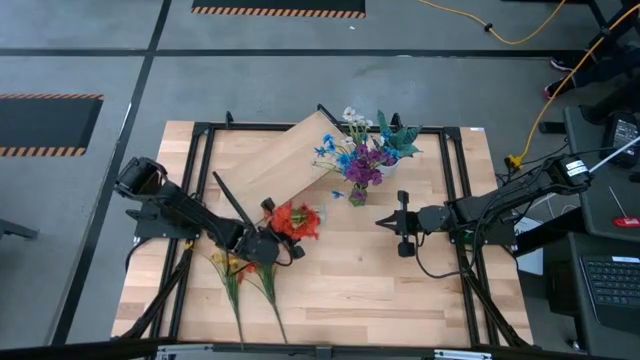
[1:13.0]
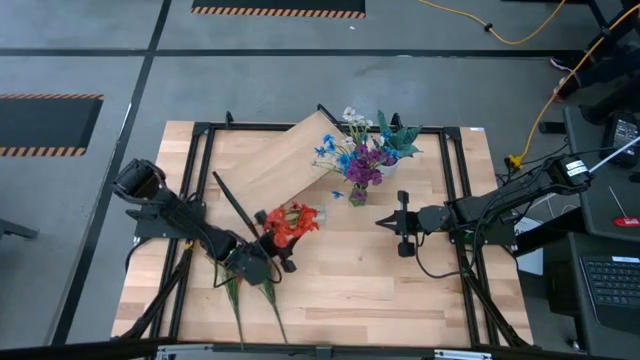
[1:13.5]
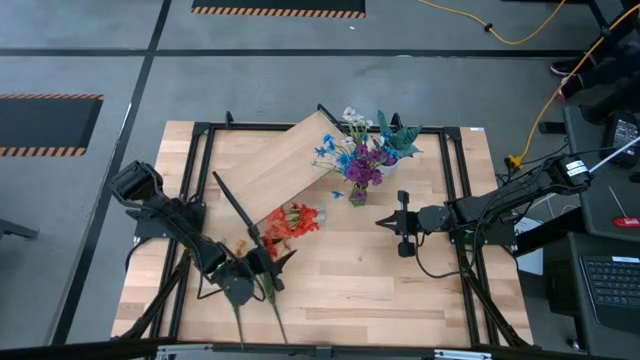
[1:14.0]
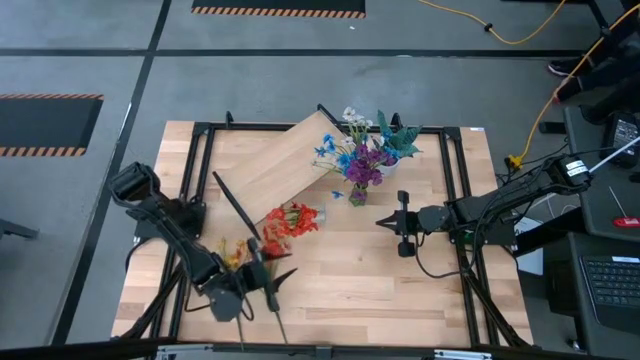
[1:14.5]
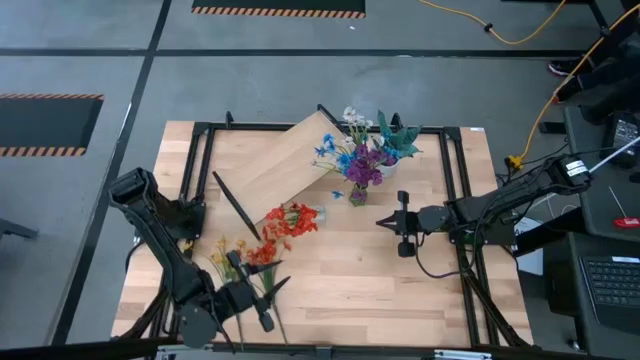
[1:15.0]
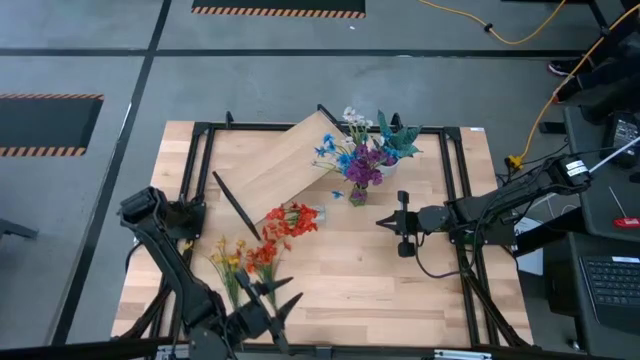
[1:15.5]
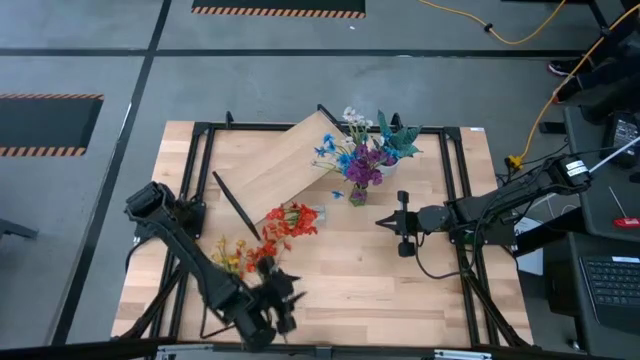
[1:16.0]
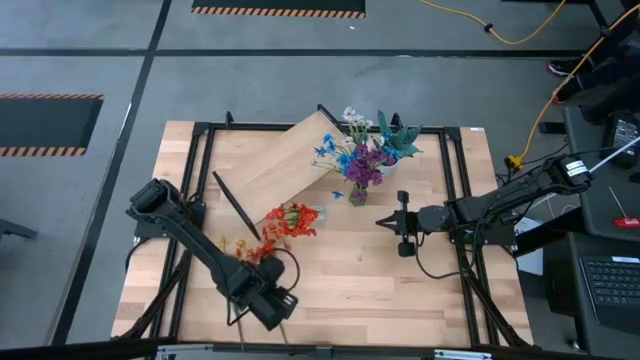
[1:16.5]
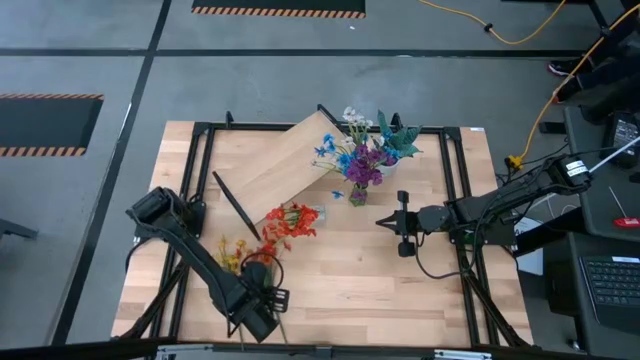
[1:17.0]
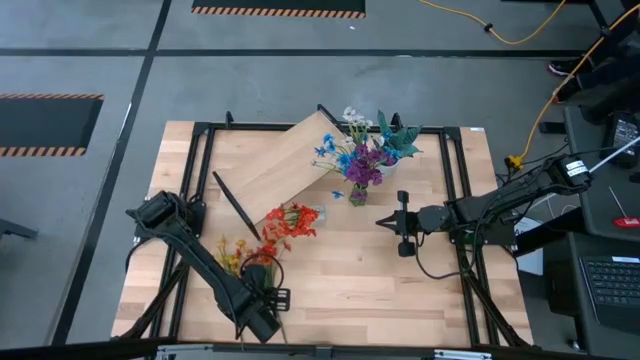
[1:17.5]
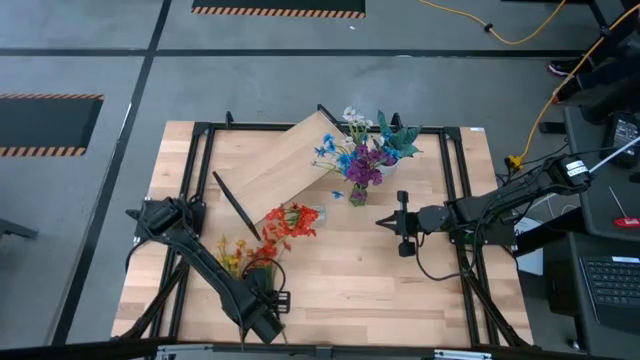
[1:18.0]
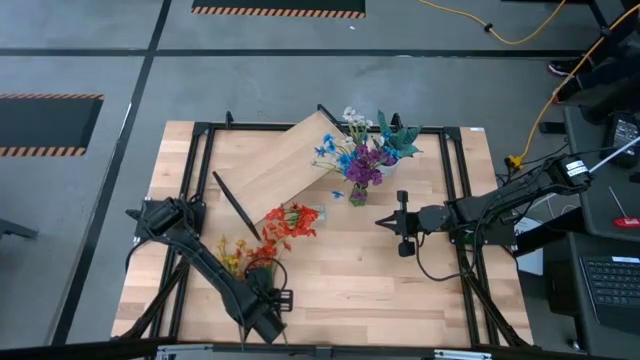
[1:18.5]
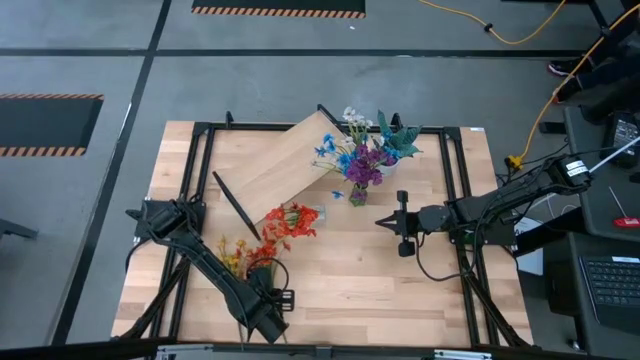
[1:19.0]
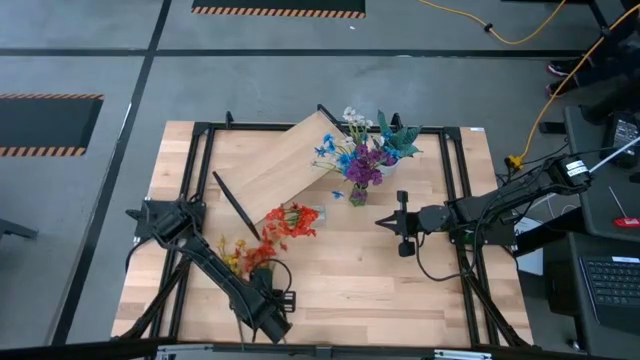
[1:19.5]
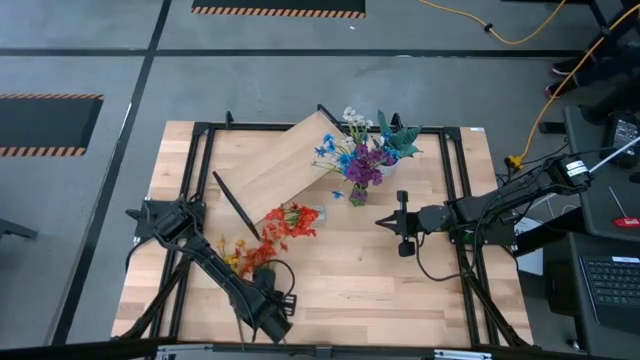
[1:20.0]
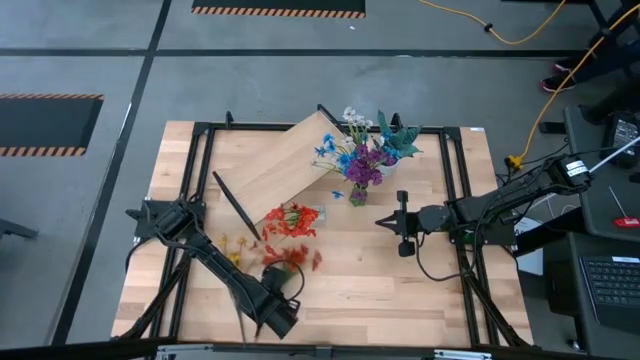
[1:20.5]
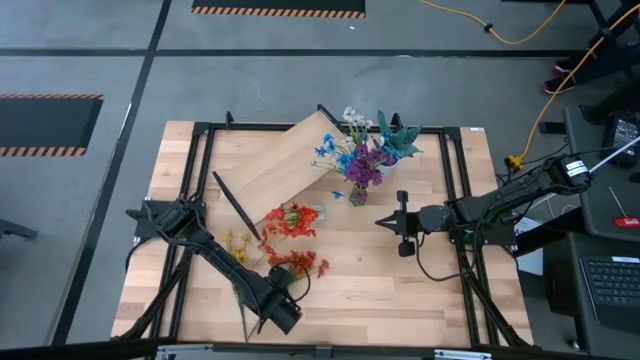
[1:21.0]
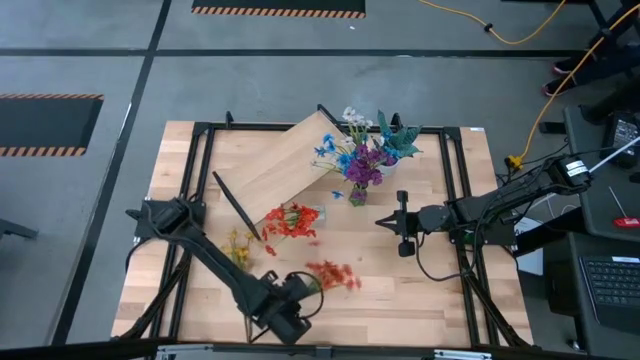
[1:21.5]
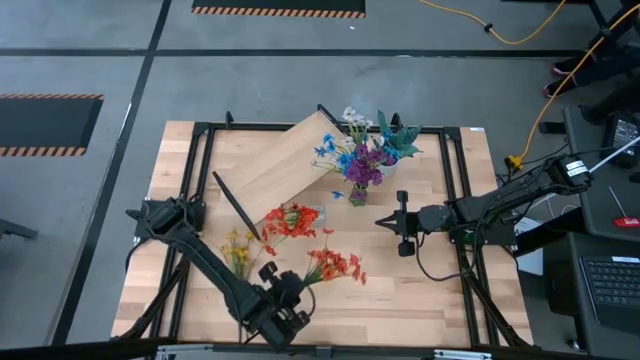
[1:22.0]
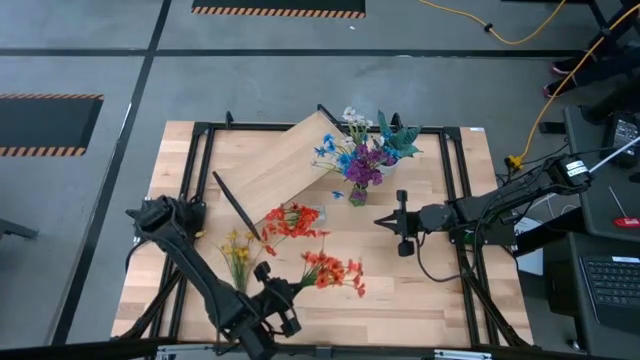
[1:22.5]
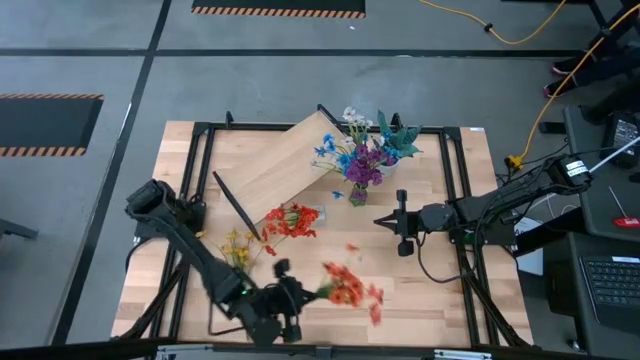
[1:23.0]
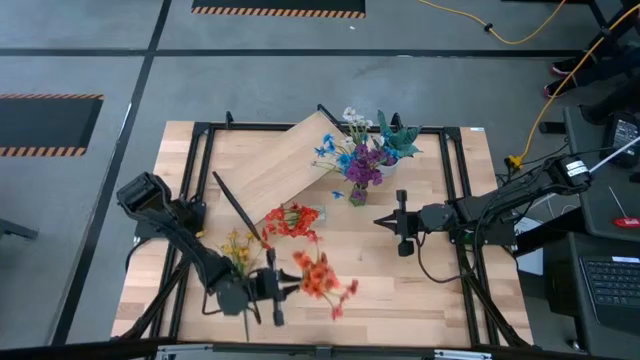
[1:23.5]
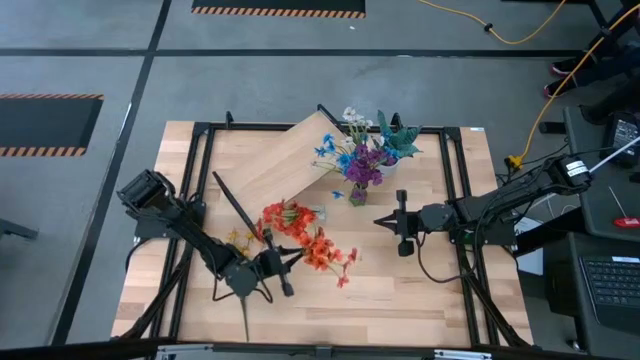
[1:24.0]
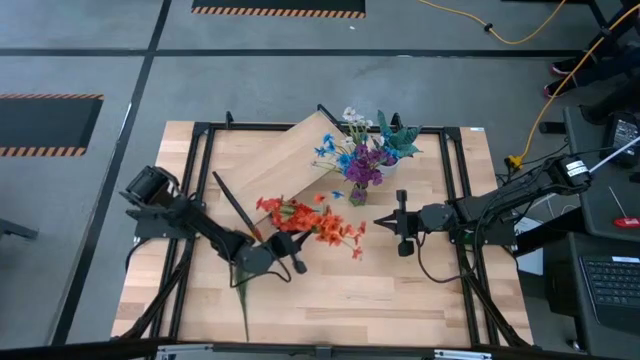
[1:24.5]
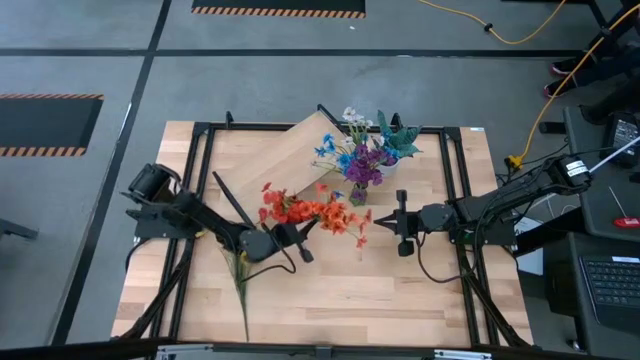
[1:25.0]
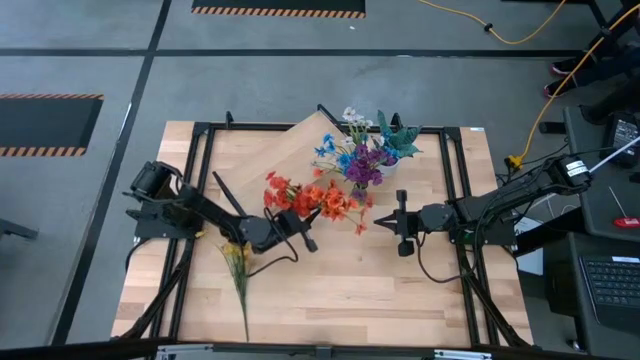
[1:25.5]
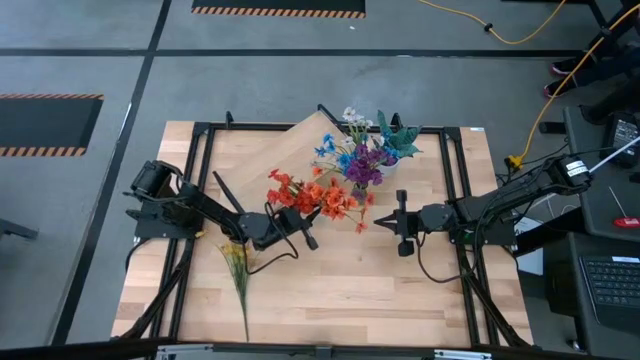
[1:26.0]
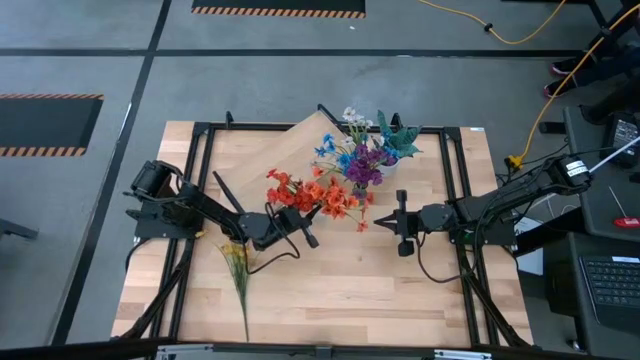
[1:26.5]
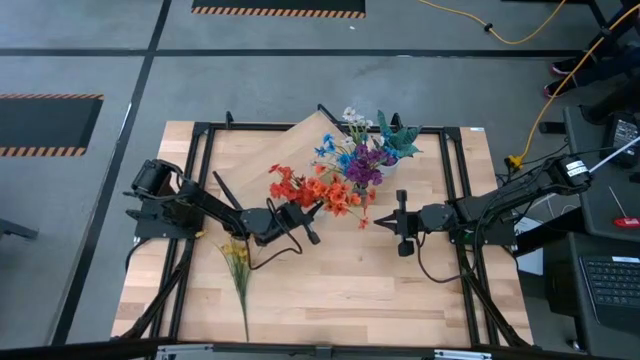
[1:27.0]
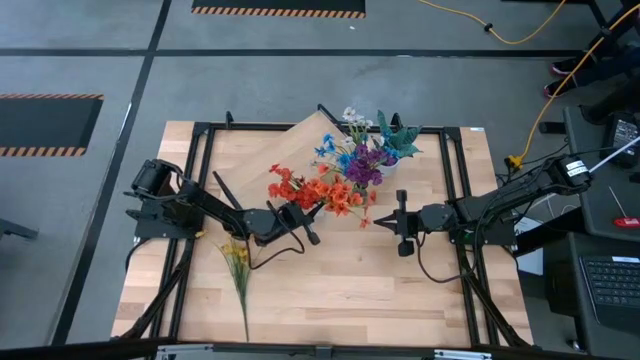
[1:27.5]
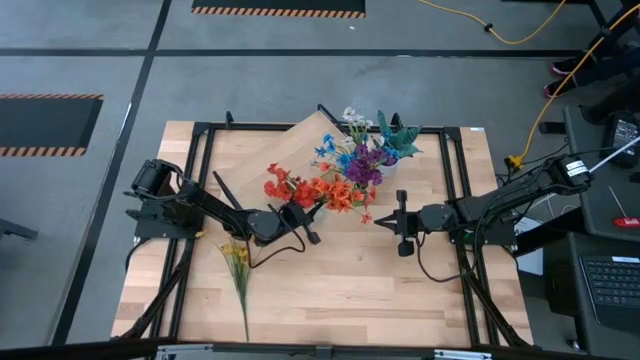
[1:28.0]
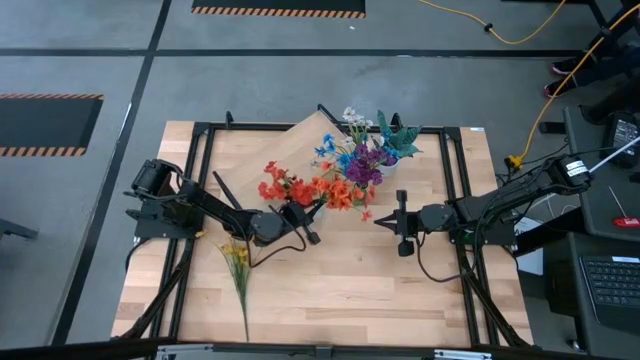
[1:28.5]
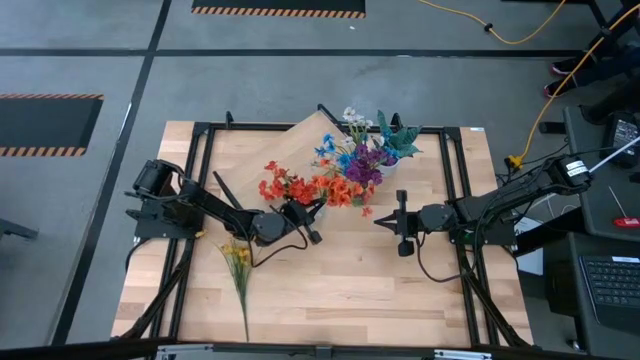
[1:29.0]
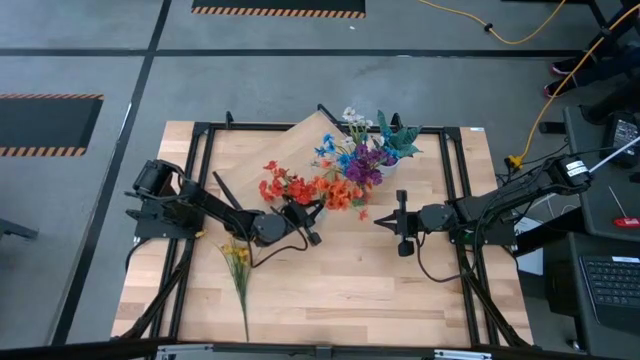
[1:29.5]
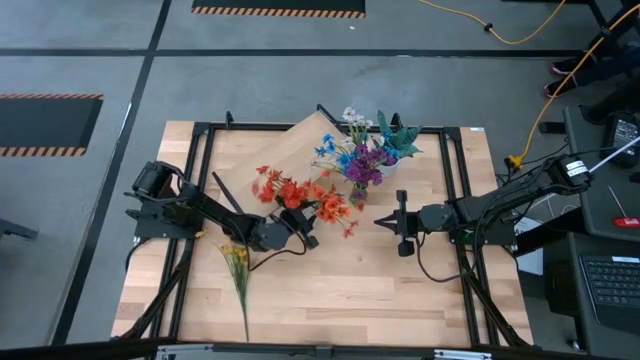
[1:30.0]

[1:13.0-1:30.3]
Task: Pick and place flowers into a vace then onto a shelf
Put the red flowers into the transparent vase

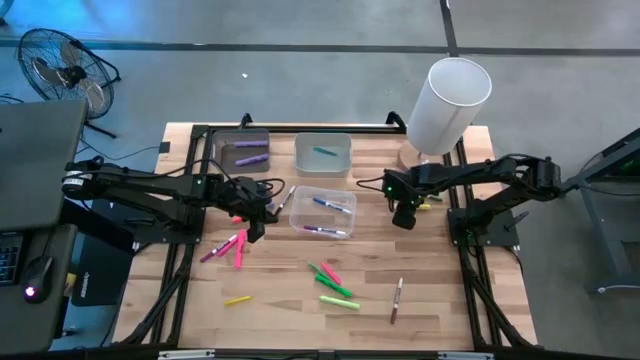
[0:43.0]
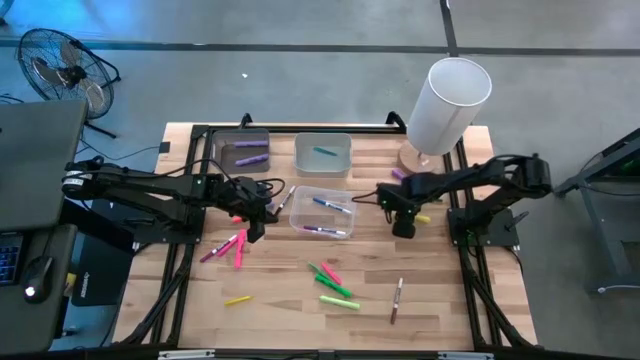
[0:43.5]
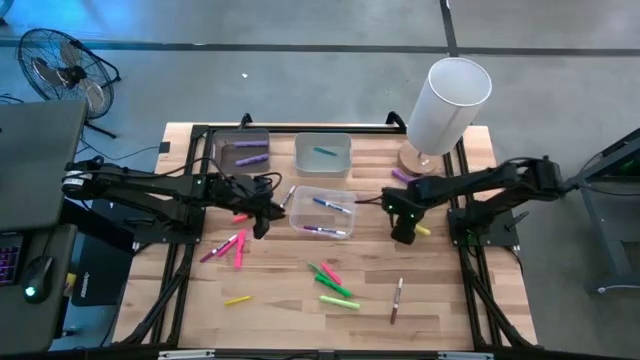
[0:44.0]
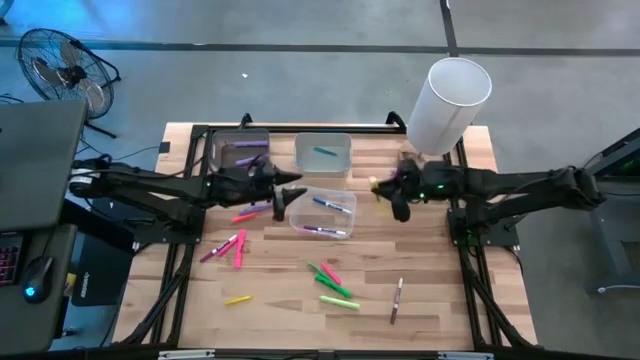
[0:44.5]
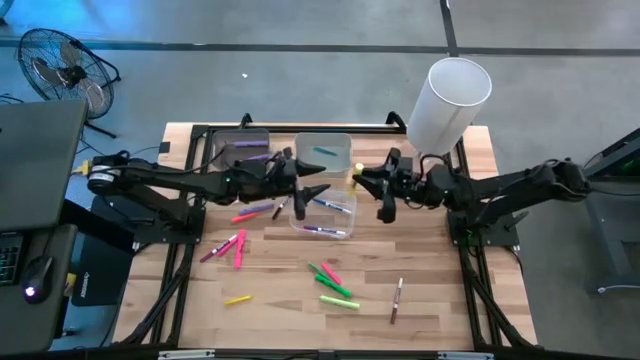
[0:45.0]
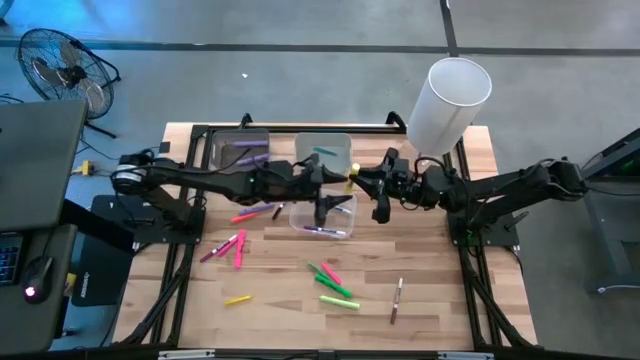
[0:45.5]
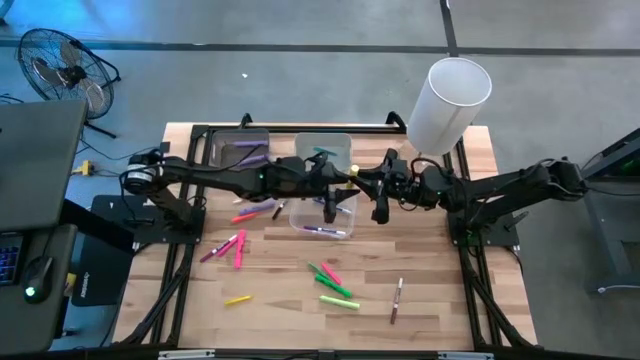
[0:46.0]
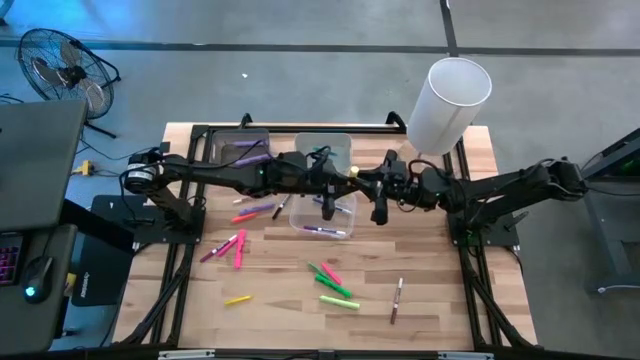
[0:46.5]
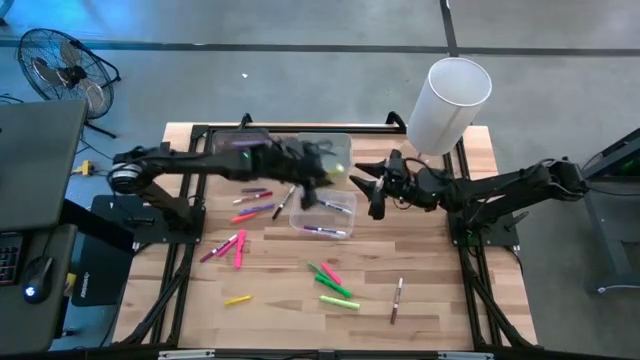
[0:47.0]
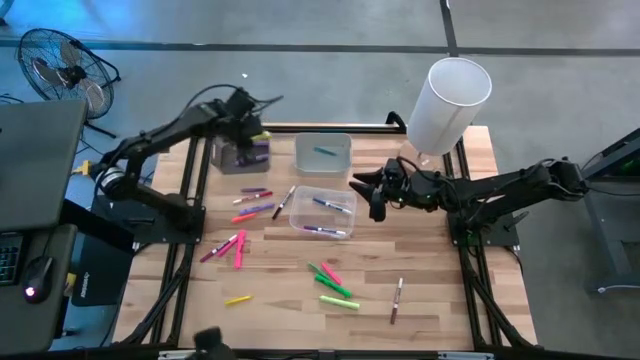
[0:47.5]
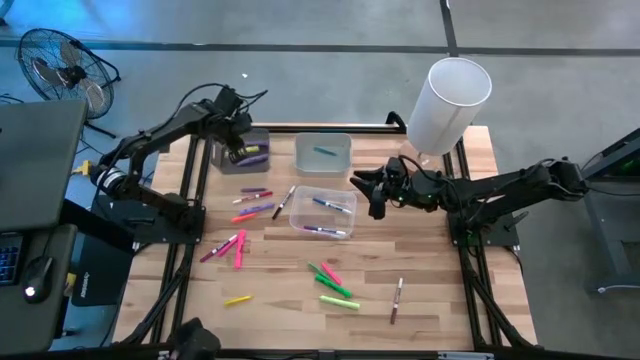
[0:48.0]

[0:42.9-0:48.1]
Task: Pick & Place Markers
Put the yellow highlighter into the black bin
